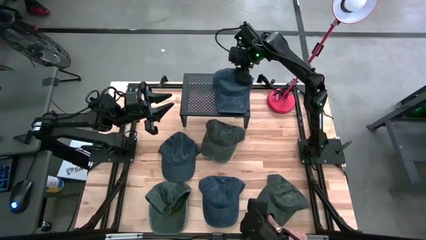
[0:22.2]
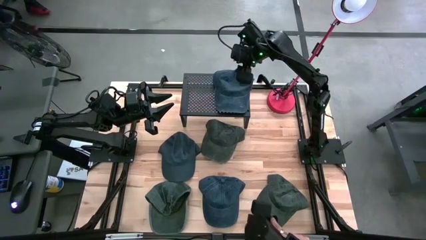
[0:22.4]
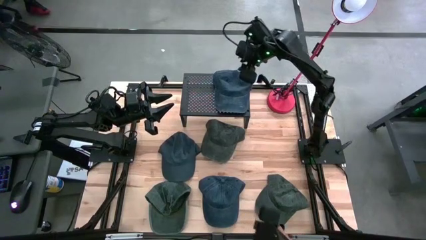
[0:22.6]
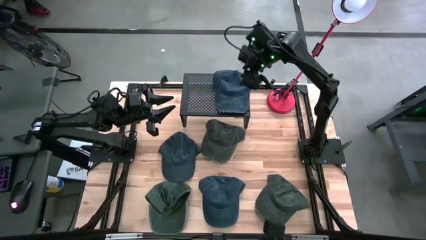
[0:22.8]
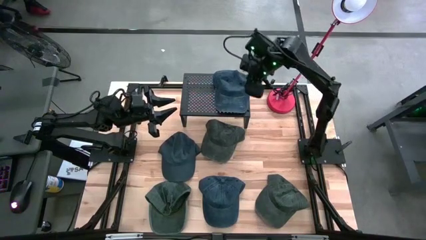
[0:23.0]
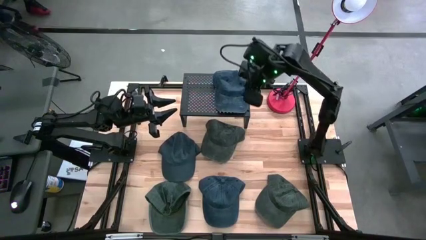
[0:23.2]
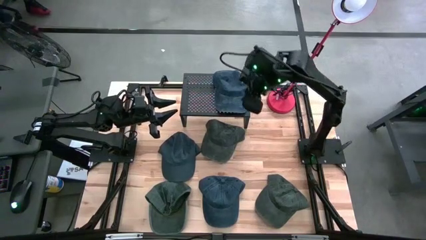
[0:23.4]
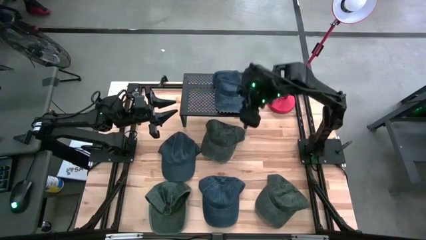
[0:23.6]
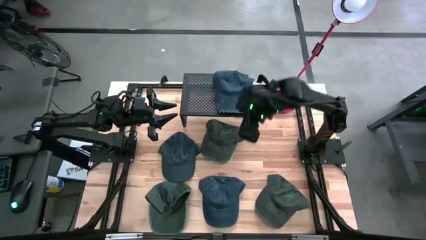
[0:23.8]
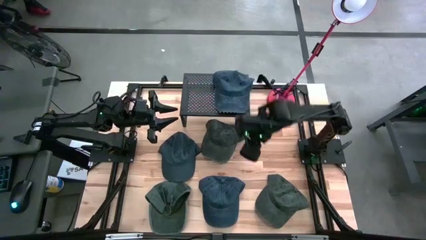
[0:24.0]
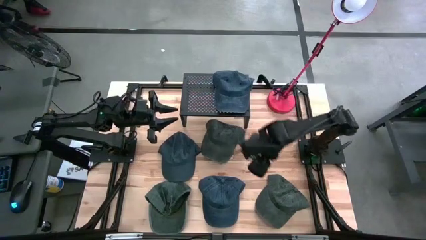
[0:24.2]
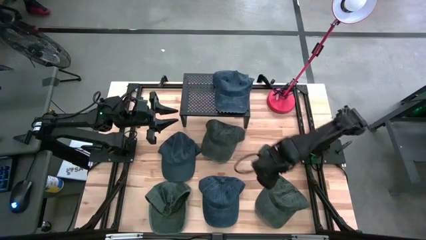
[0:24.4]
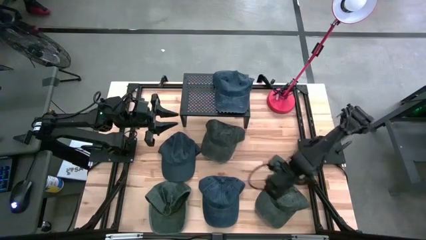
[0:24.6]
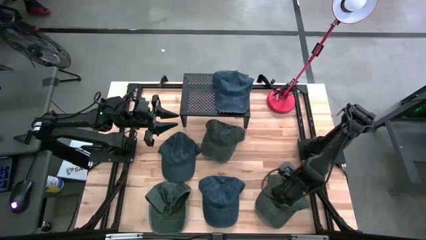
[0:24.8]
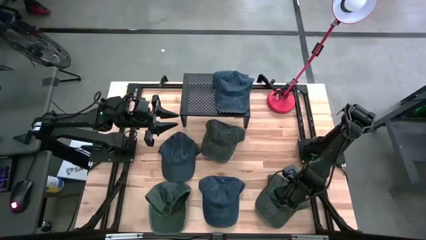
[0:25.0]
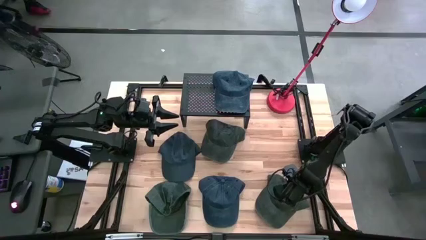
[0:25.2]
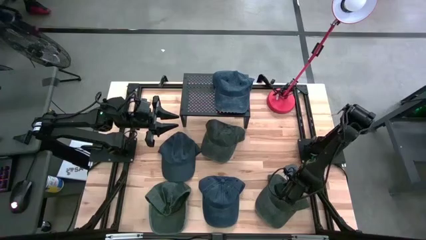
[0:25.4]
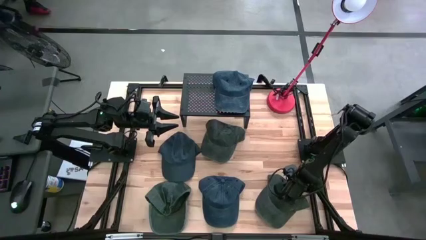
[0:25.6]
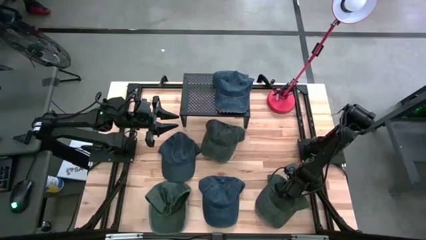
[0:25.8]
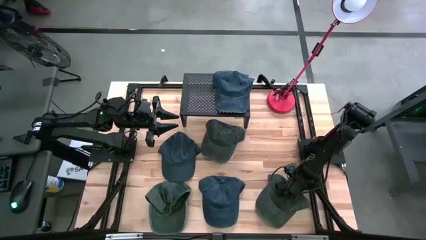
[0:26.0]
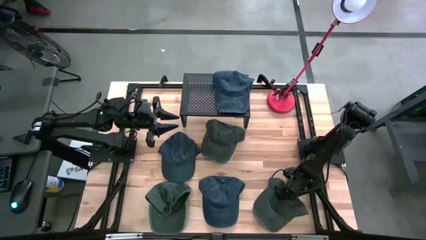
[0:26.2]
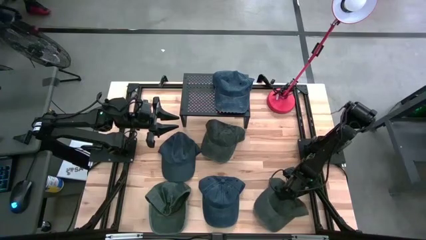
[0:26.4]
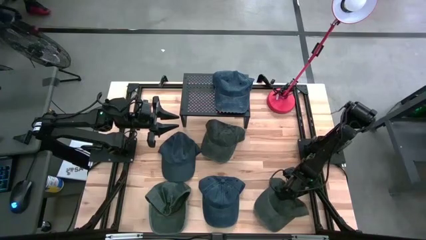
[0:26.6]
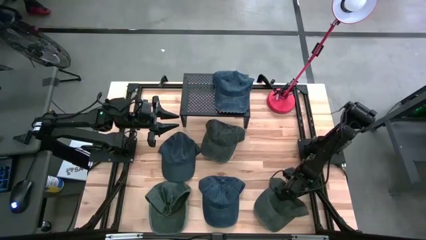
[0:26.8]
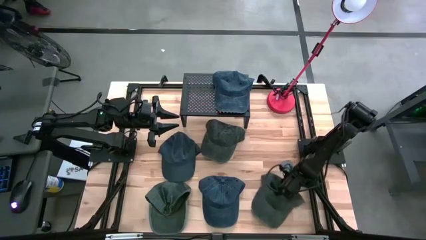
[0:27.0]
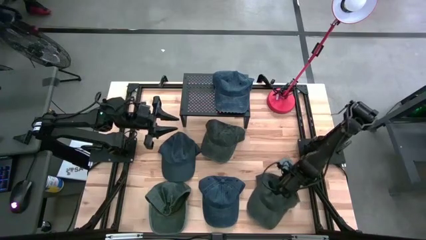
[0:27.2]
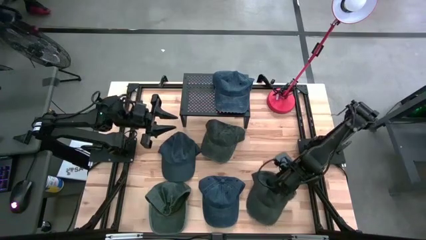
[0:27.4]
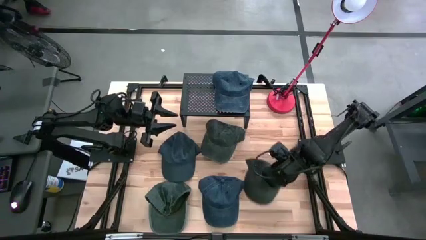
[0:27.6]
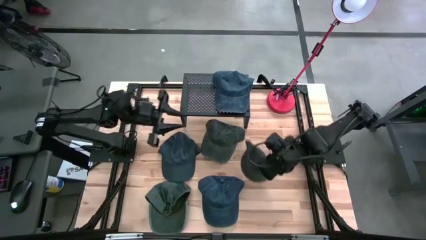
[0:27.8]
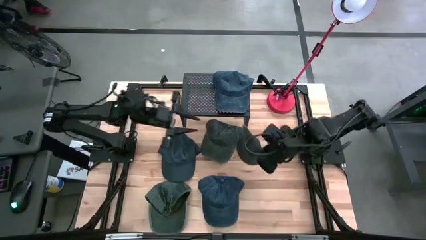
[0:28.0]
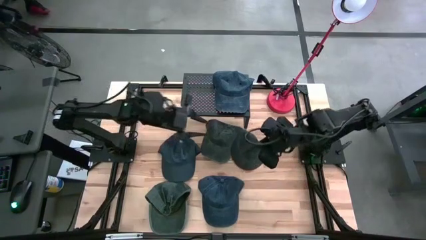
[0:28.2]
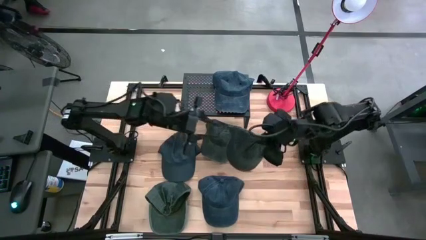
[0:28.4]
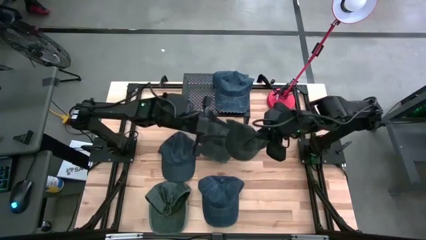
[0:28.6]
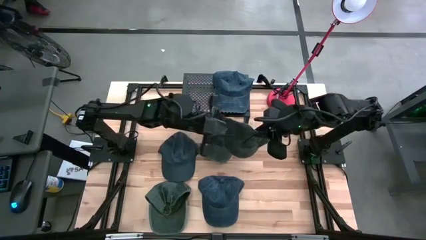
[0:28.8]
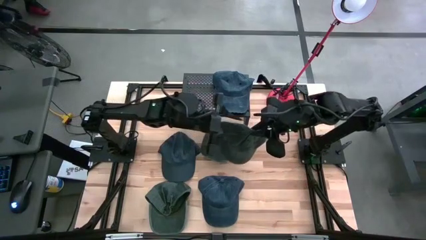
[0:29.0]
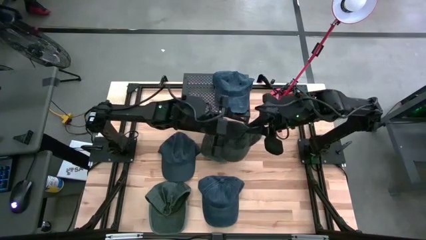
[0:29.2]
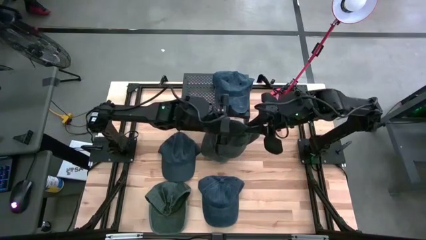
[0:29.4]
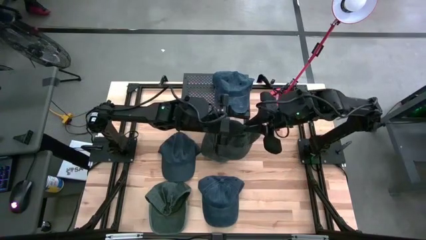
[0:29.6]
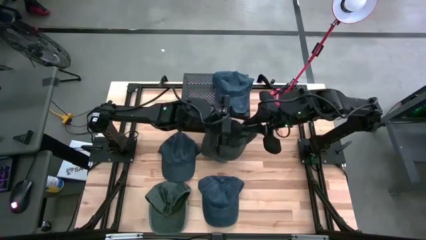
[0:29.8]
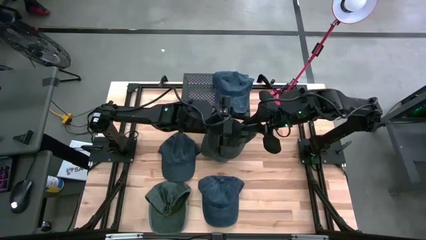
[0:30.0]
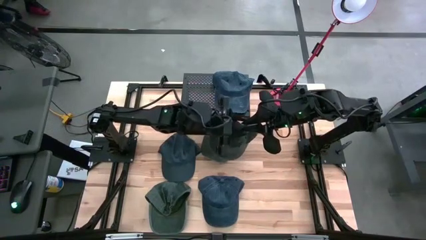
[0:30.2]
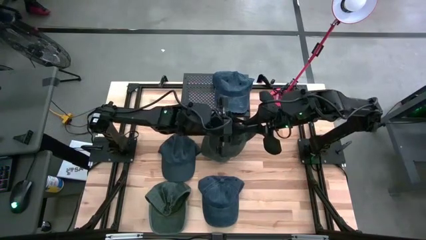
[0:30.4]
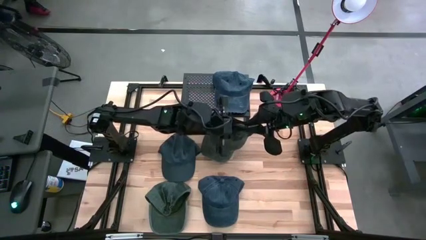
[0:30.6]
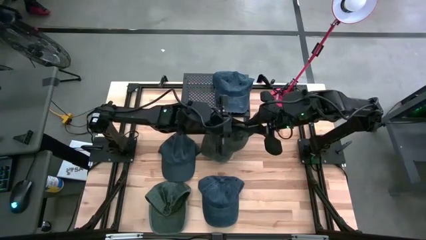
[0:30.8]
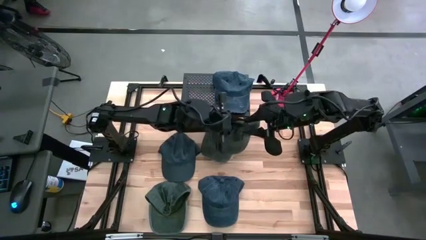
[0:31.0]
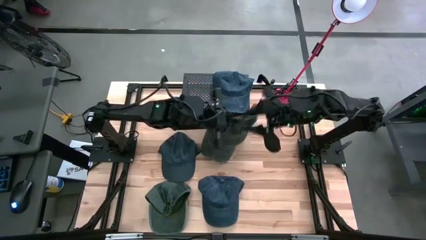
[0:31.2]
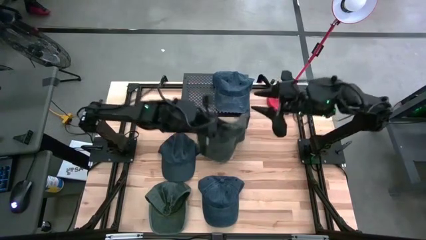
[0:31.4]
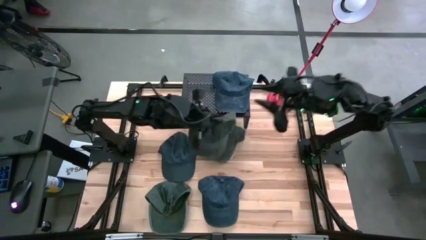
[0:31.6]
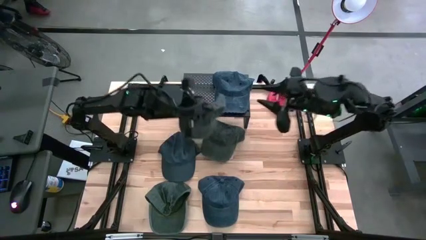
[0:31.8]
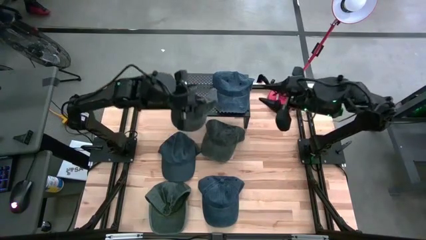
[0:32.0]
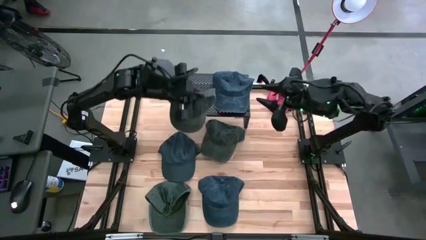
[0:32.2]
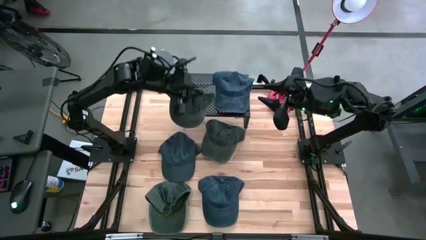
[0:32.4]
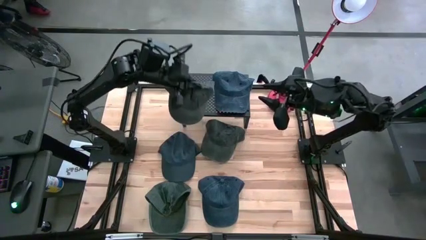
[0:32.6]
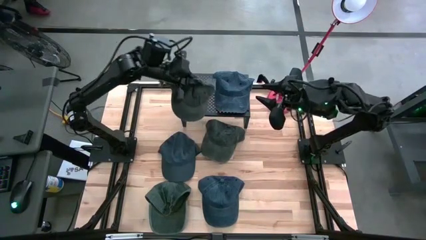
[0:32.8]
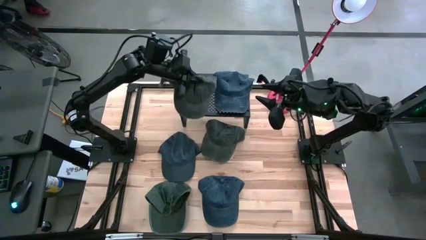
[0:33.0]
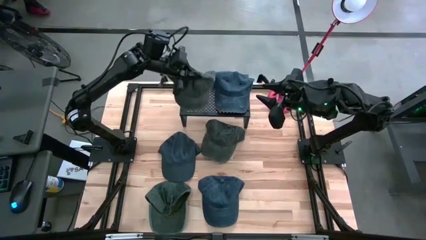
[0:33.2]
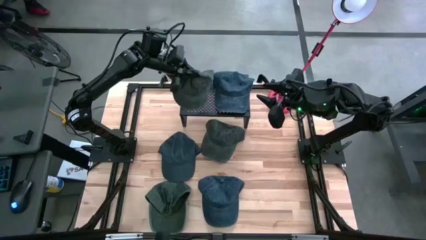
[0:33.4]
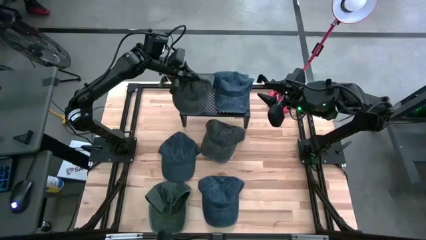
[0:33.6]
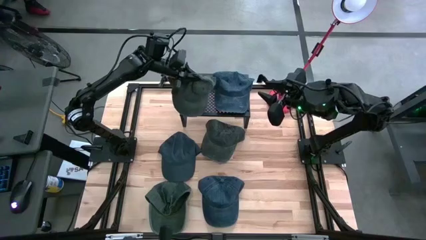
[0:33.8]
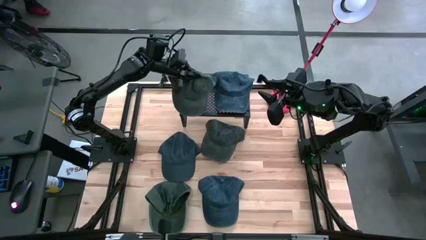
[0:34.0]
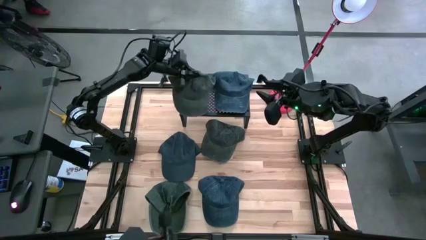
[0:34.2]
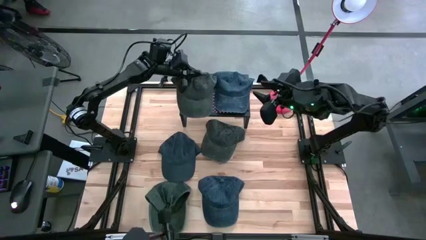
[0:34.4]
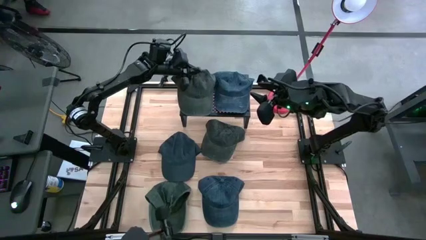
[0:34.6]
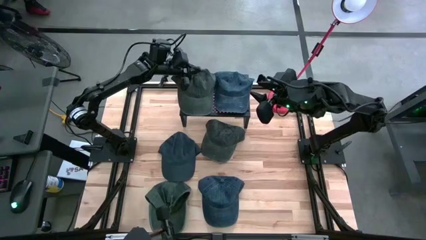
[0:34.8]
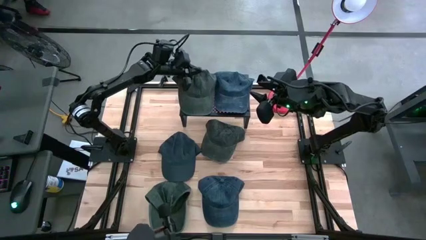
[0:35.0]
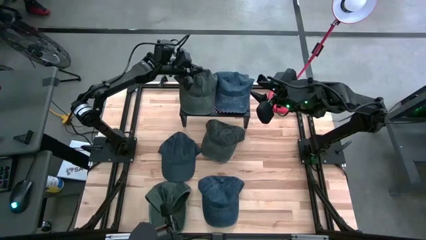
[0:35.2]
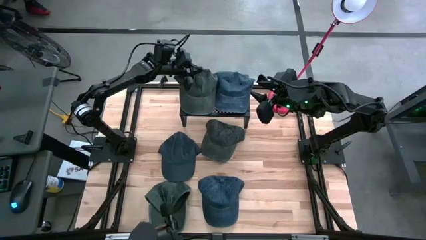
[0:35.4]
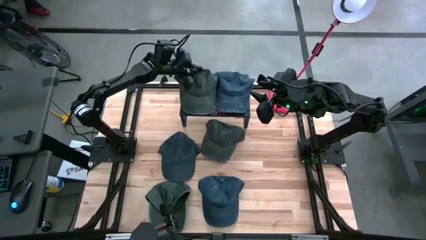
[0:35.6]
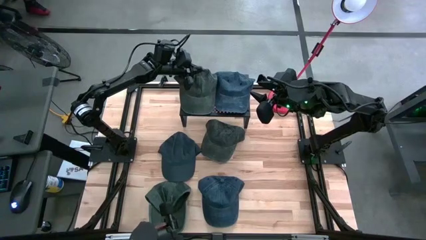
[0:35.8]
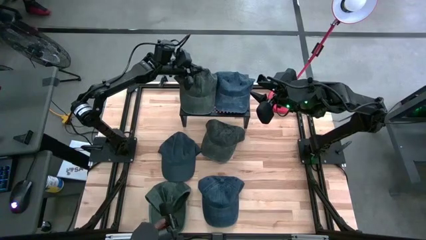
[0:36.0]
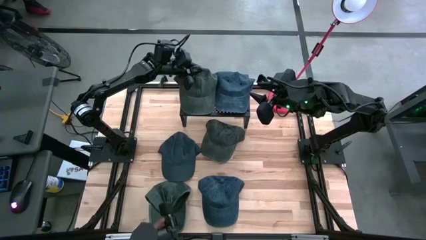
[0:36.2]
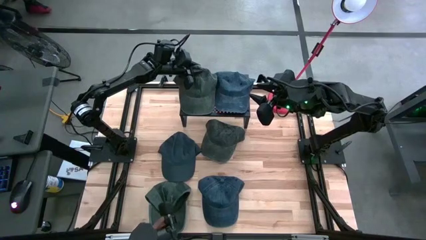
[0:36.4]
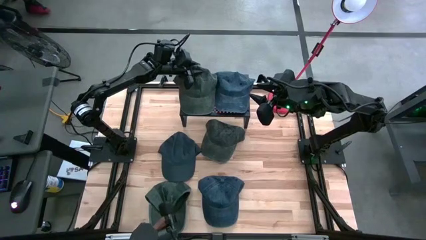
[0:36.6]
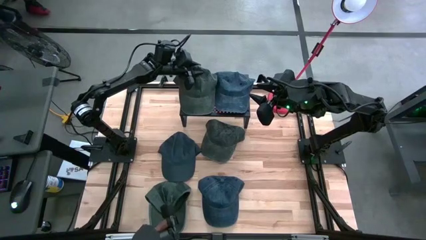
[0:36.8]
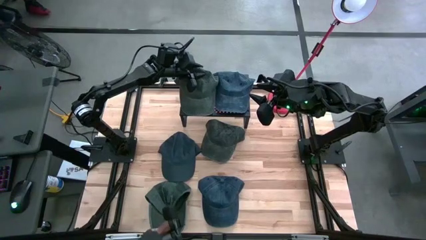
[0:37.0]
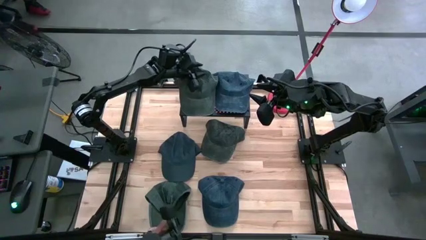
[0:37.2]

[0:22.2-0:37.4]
Task: Pick & Place hat
Put the bottom right dark green cap on the shelf
